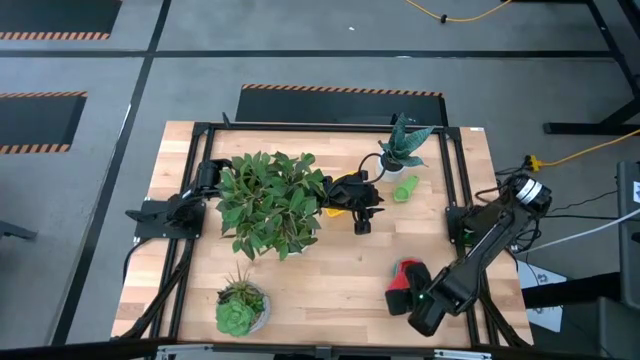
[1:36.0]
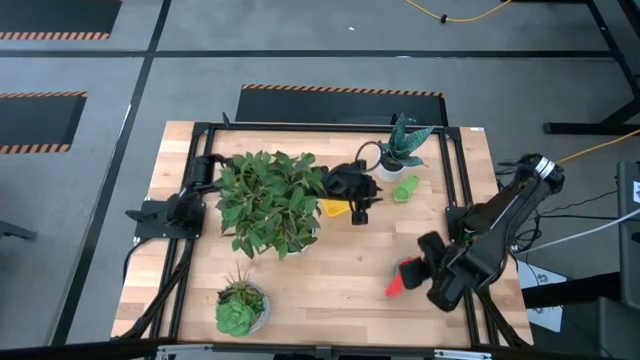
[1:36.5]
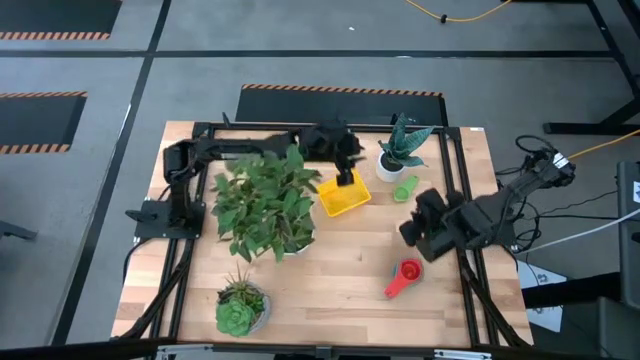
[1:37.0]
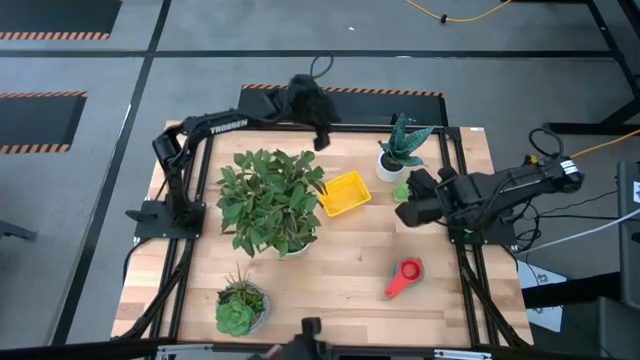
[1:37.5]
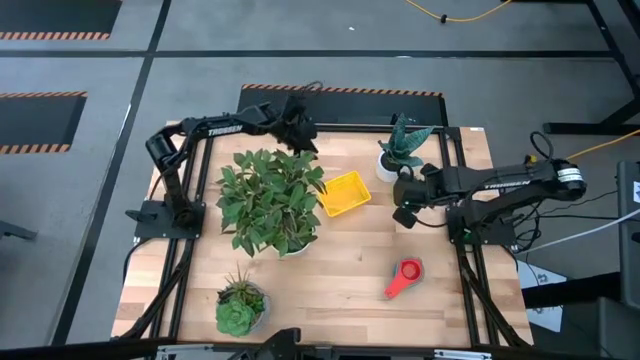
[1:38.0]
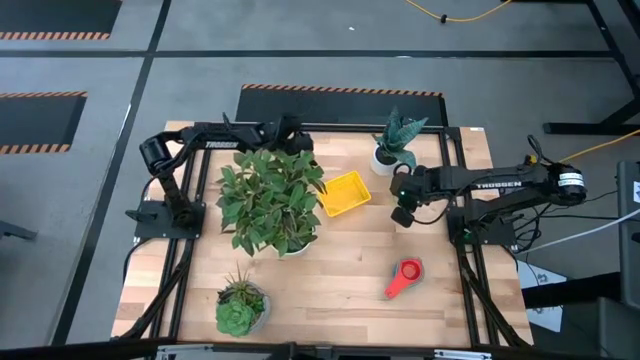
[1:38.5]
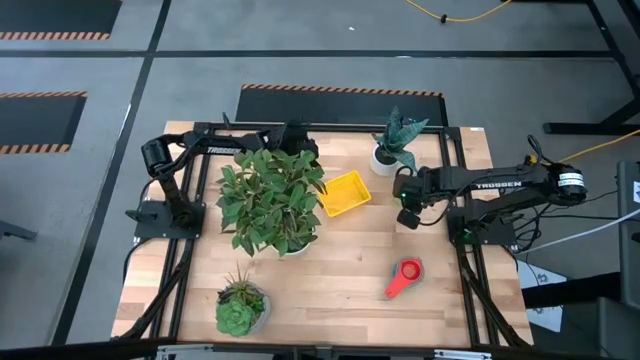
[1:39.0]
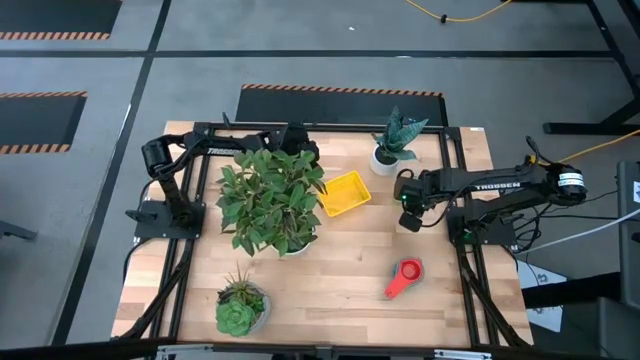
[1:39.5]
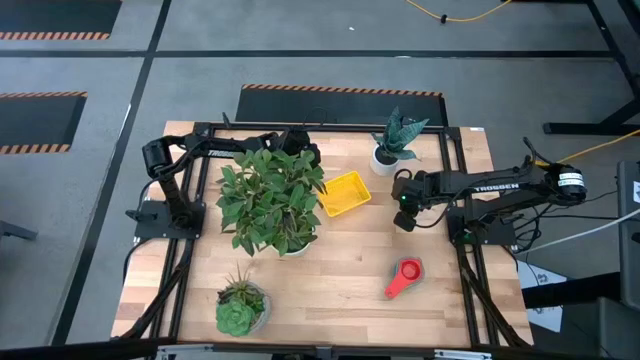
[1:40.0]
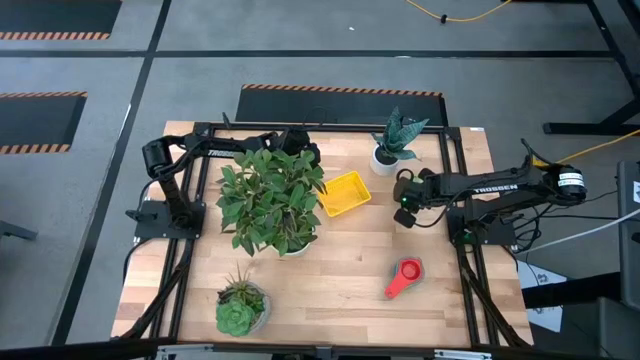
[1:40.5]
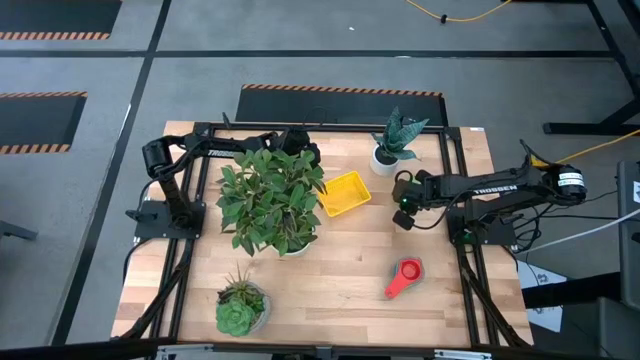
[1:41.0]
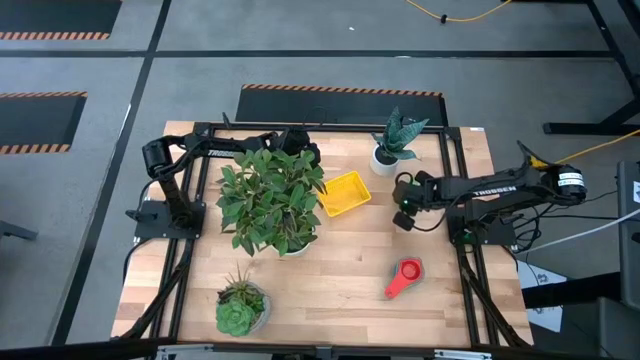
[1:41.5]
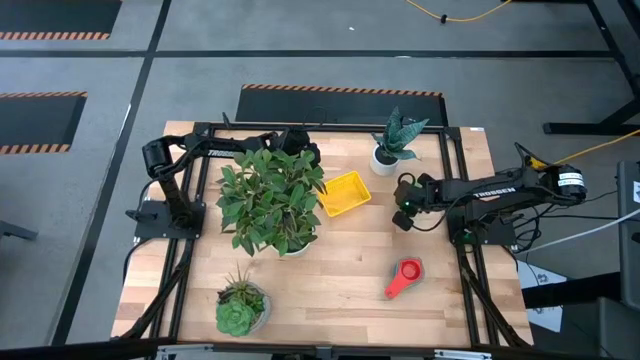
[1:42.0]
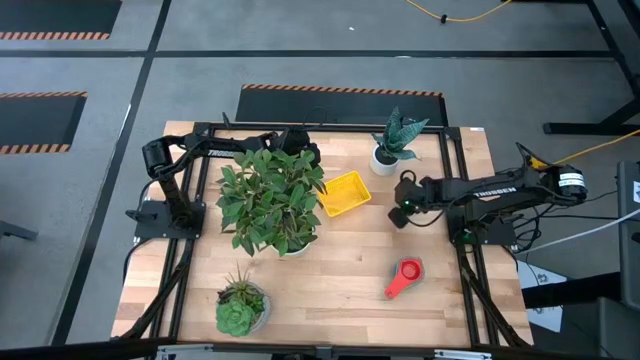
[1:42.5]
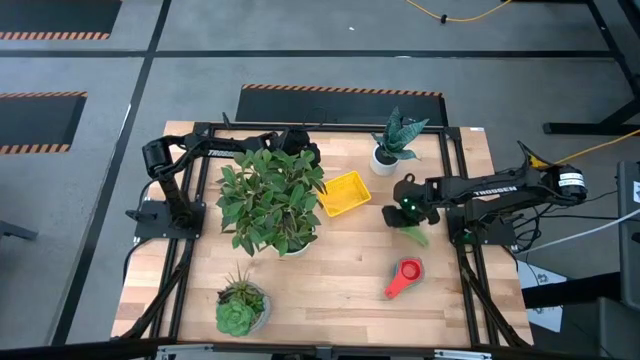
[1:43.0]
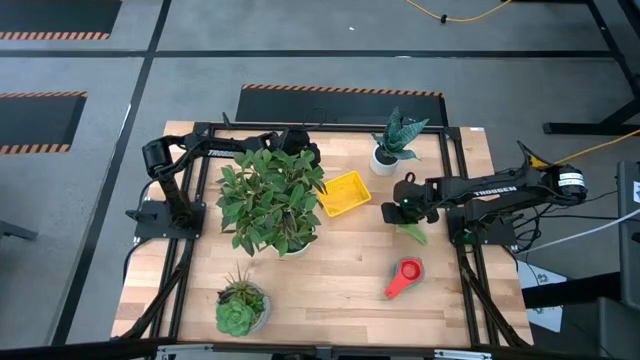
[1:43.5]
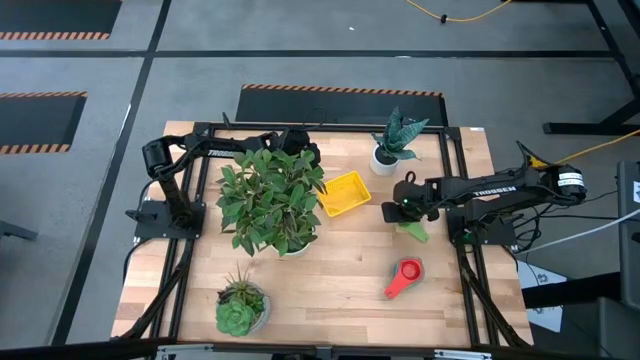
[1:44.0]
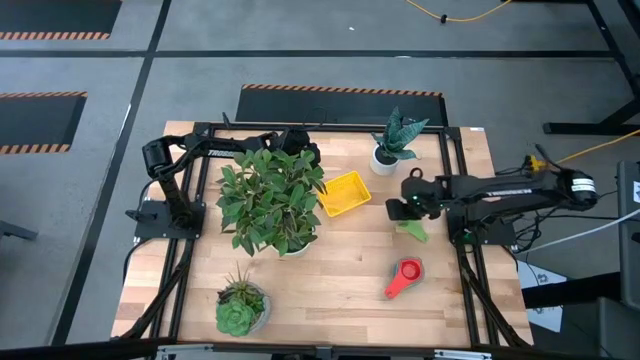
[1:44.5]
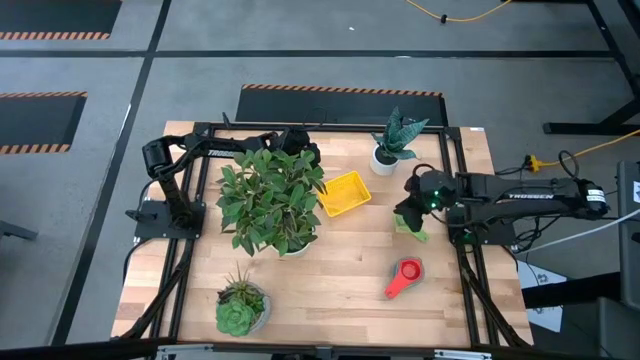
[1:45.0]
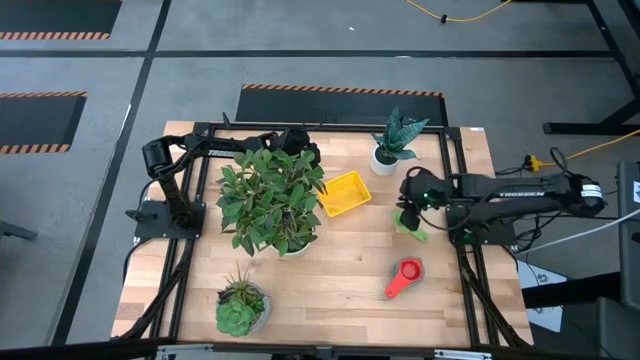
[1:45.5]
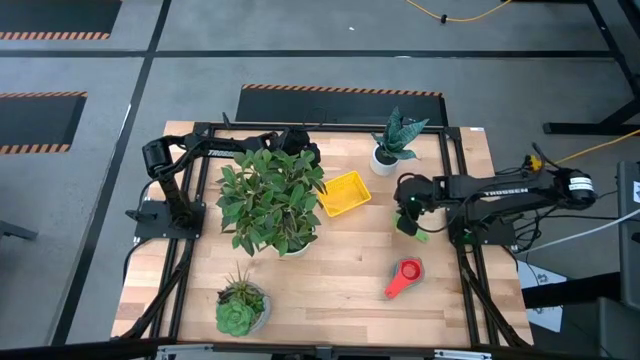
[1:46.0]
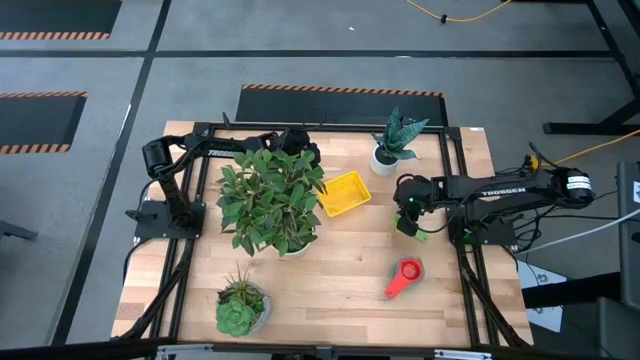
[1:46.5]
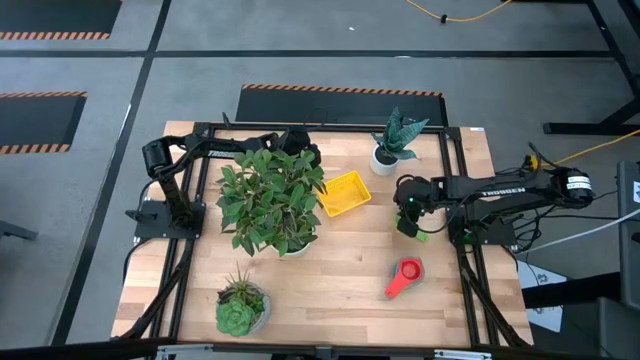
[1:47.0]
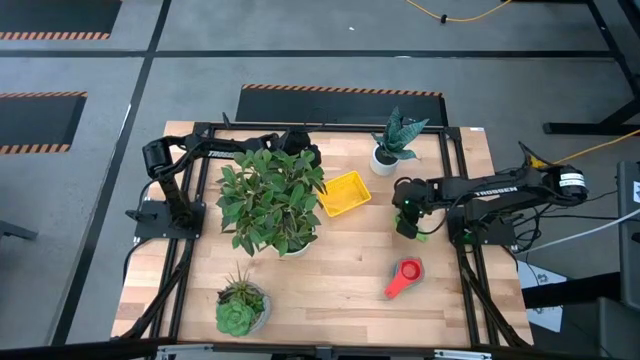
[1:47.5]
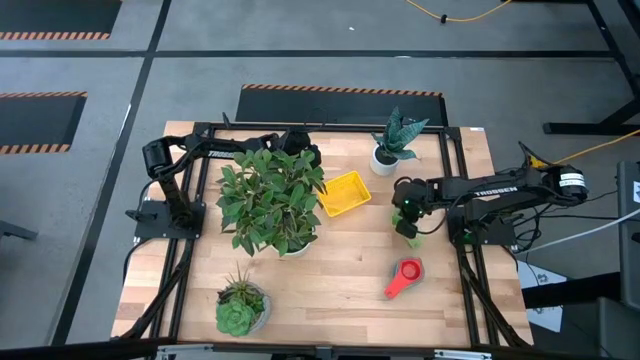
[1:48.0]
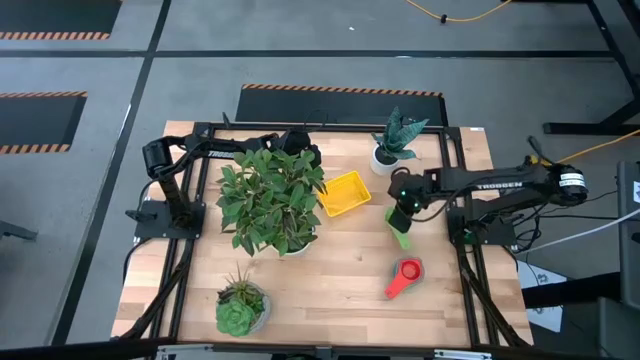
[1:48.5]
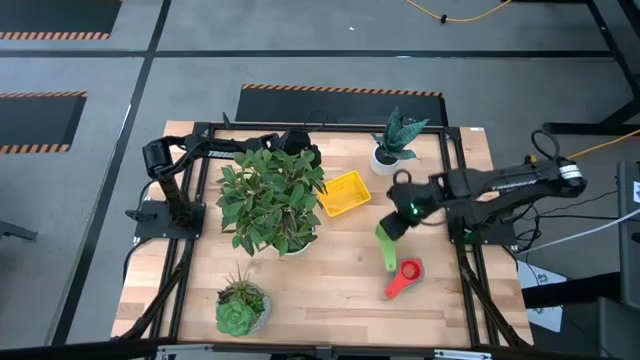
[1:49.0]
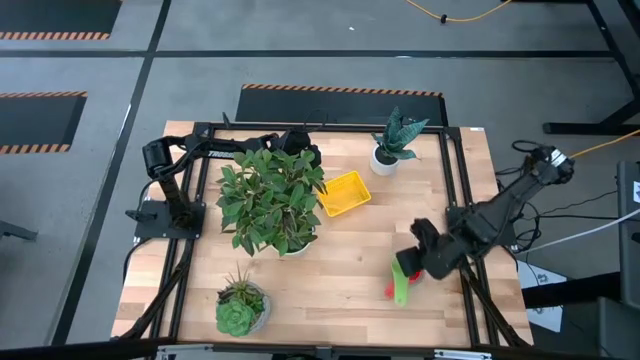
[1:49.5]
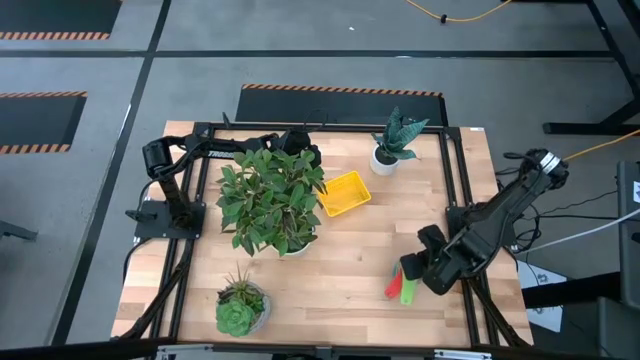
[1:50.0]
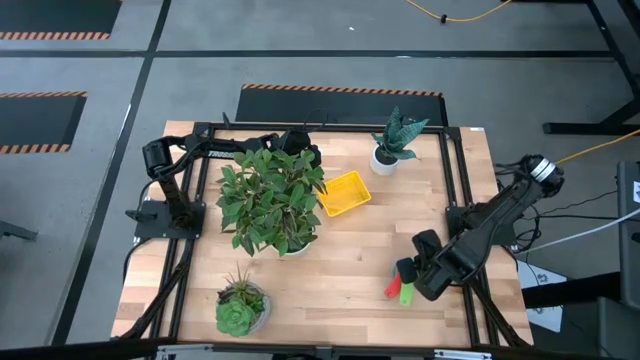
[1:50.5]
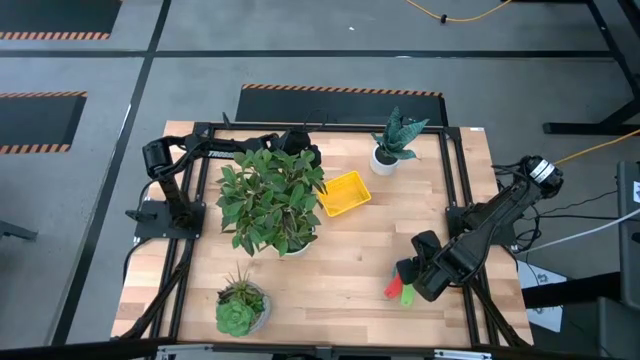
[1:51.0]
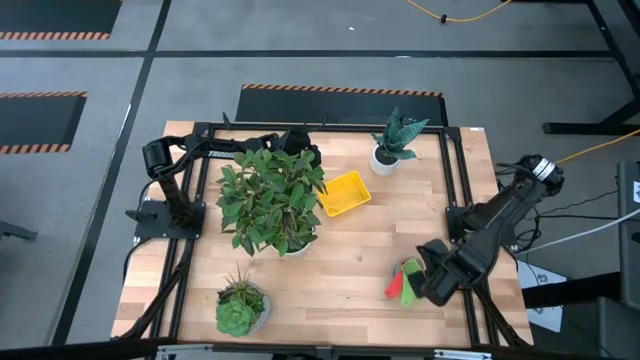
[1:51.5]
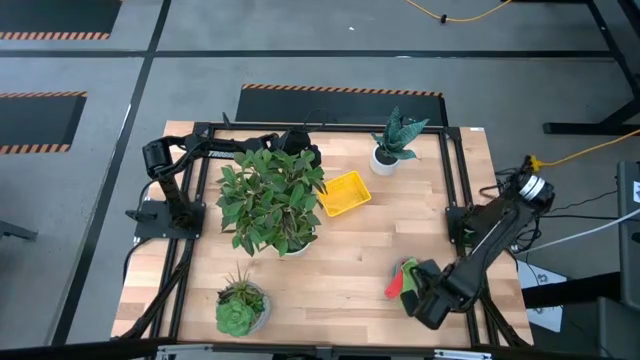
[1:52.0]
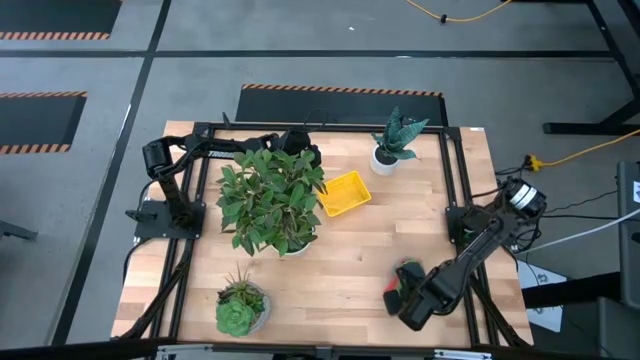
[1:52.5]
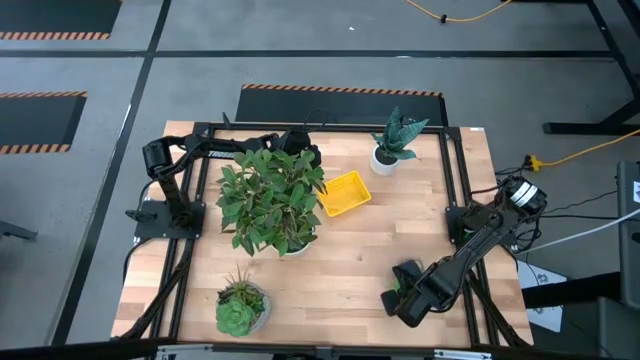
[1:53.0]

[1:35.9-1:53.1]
Task: Nest measuring cups in basket
Stack the green measuring cup on top of the red measuring cup
